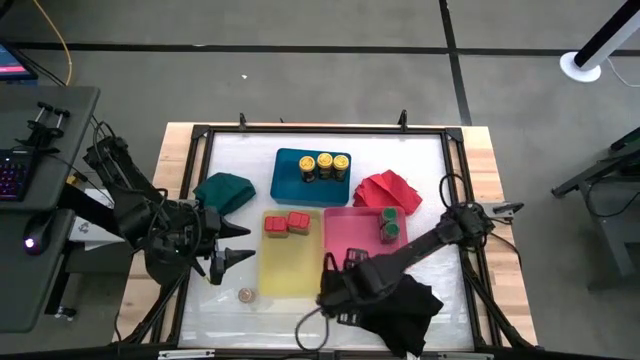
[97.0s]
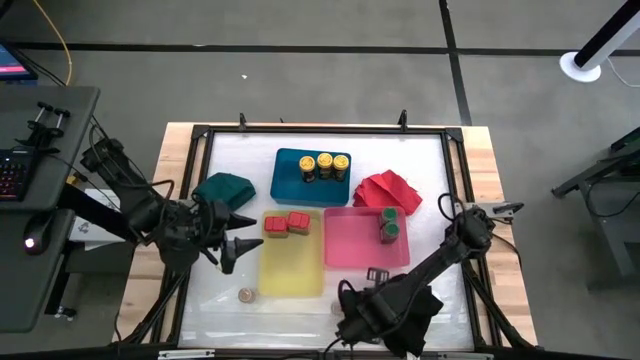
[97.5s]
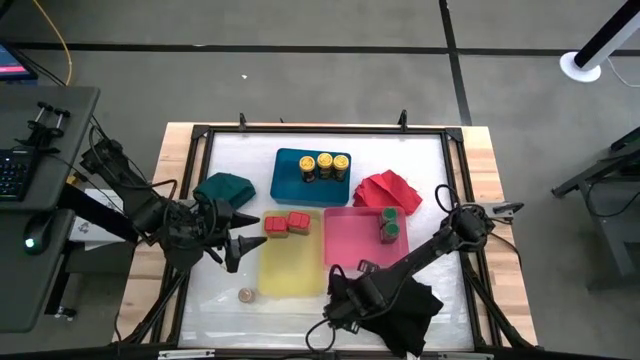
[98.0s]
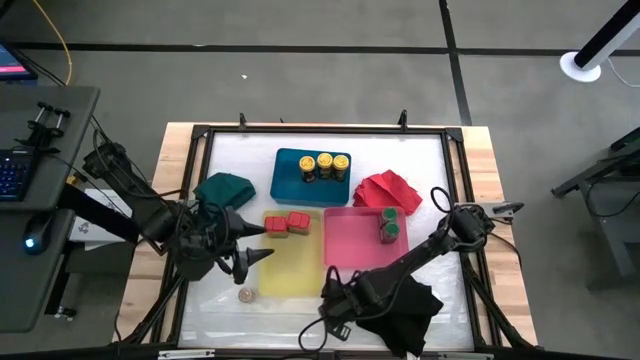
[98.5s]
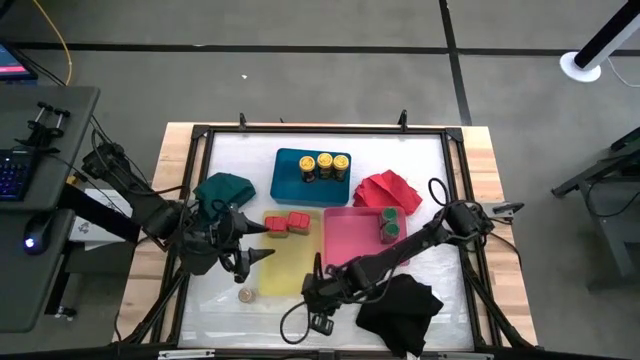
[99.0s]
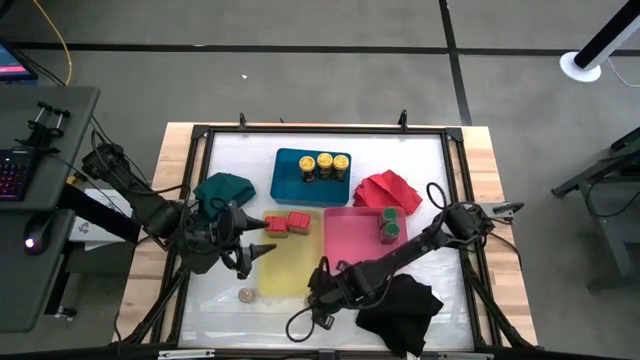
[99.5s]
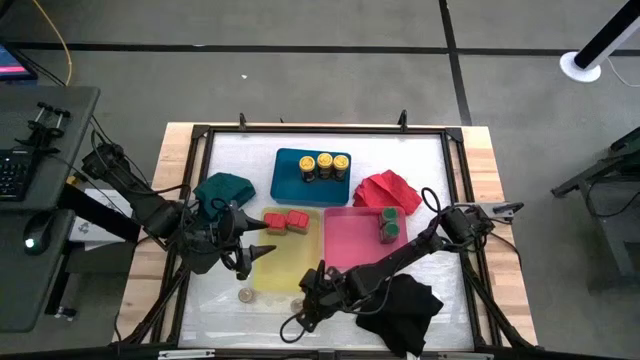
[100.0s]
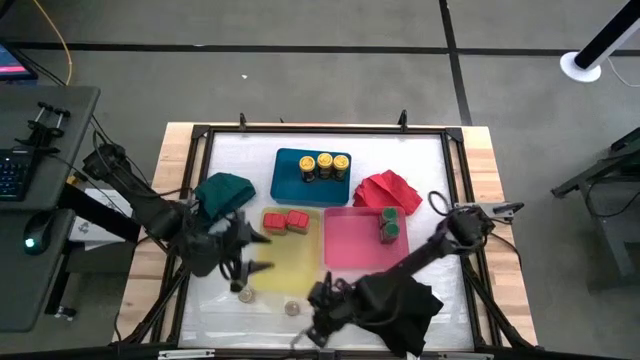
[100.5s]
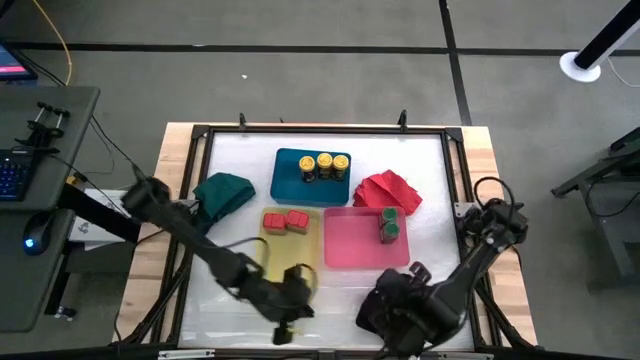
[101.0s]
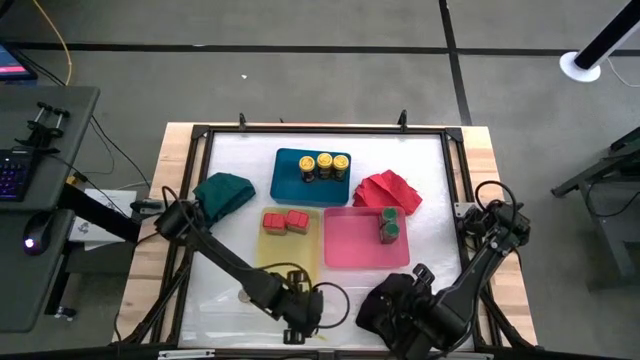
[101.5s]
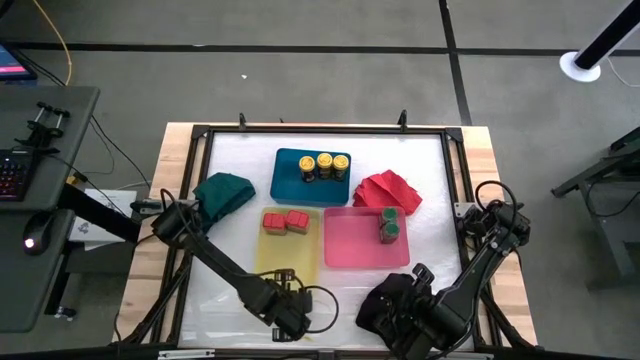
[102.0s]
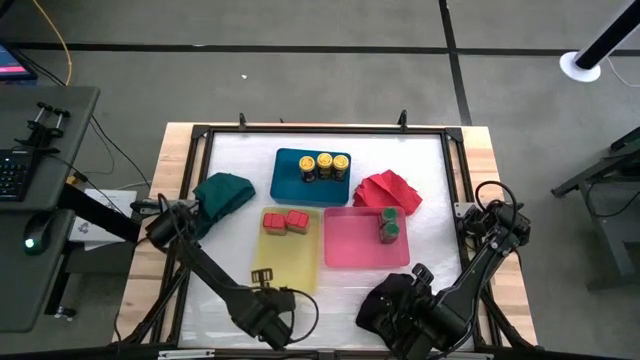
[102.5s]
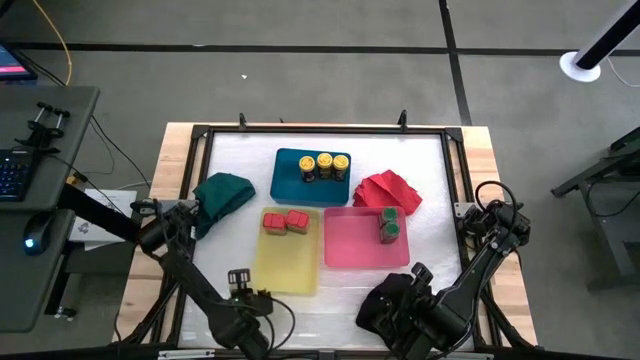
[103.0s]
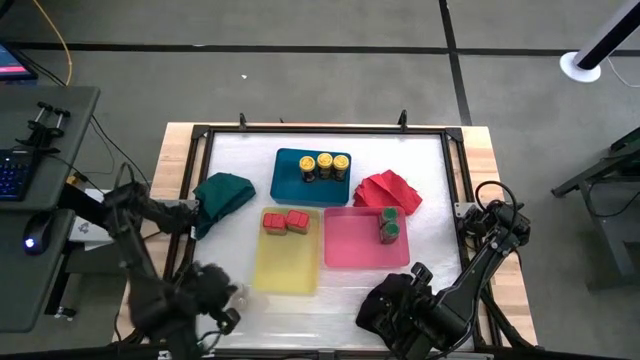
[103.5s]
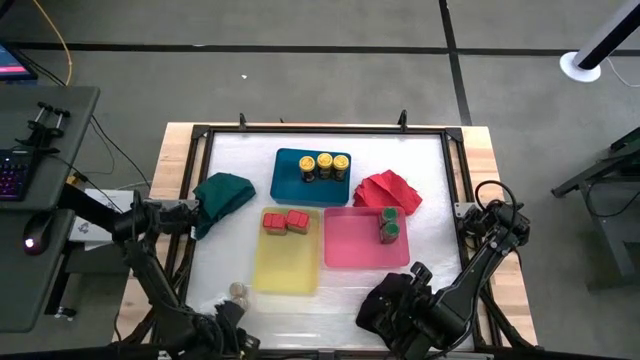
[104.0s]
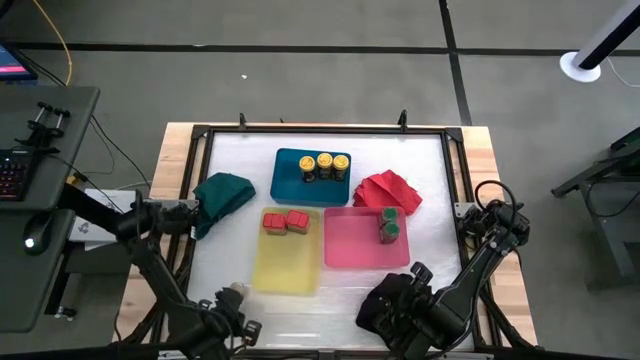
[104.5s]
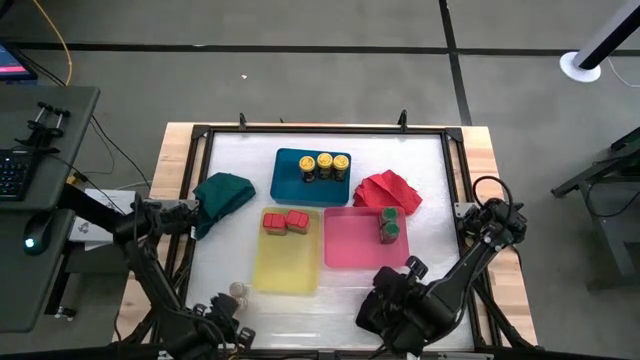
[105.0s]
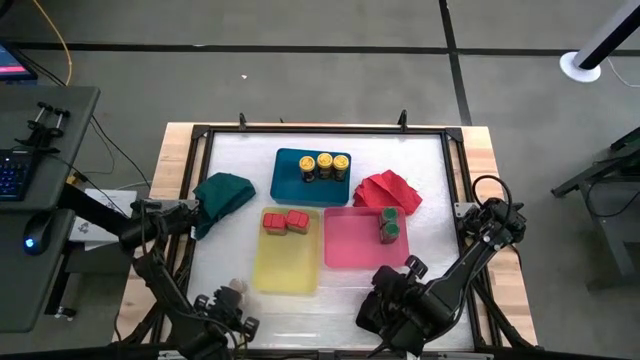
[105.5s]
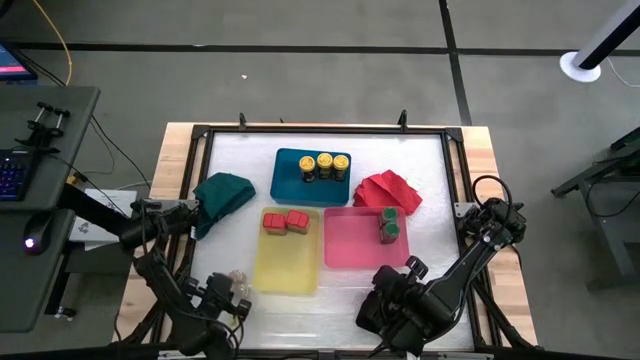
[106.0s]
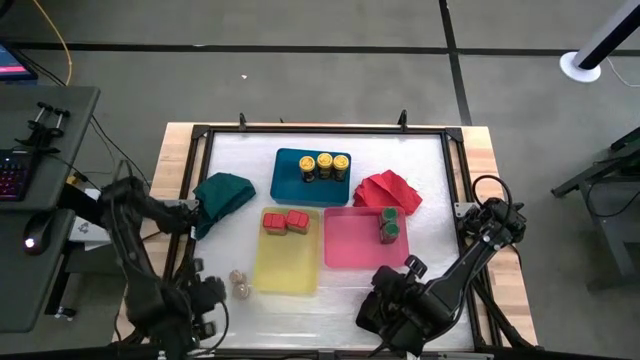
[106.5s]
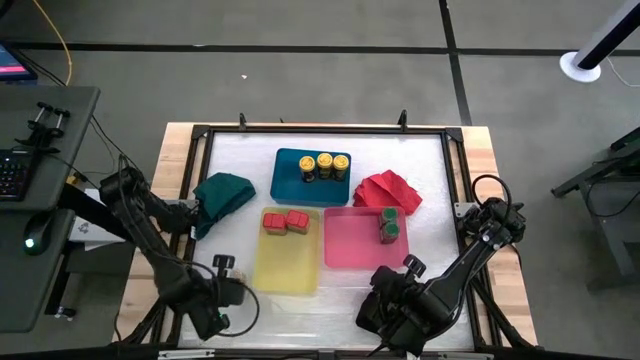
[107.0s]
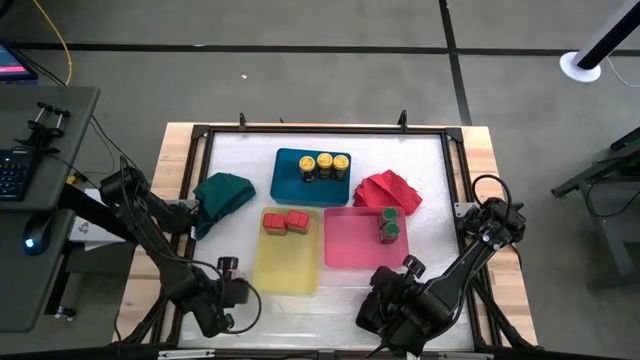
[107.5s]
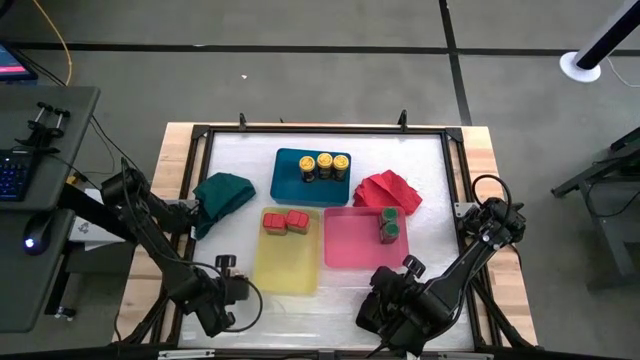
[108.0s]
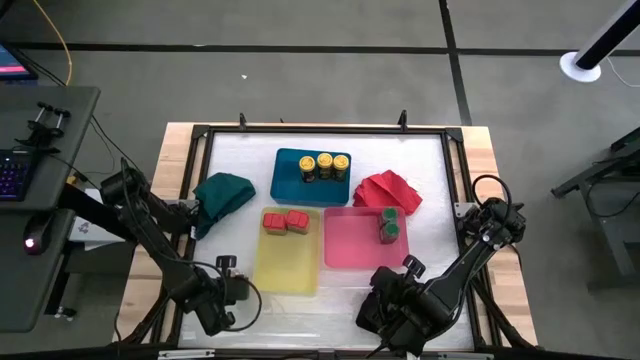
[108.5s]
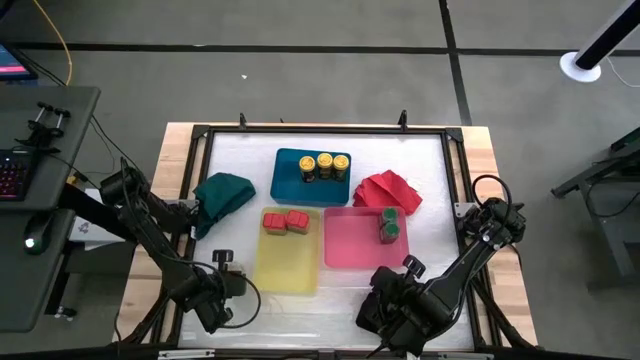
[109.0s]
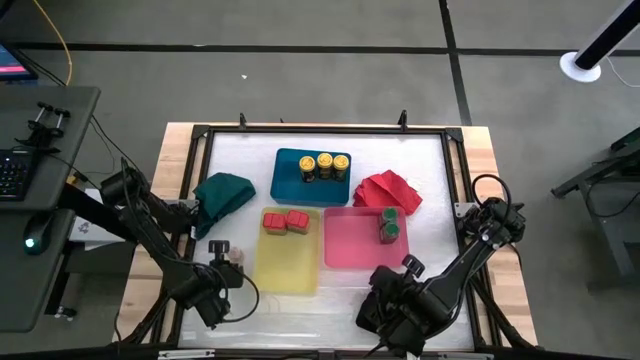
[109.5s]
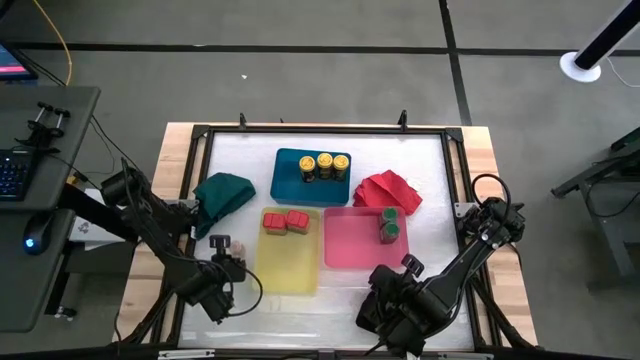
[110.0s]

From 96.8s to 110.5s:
Task: Sort spices by type
Adjust the brown spice bottles on the table

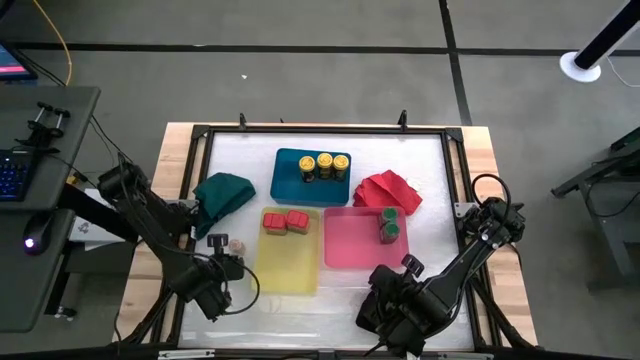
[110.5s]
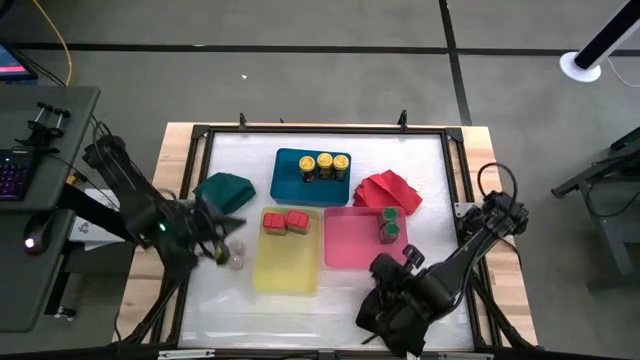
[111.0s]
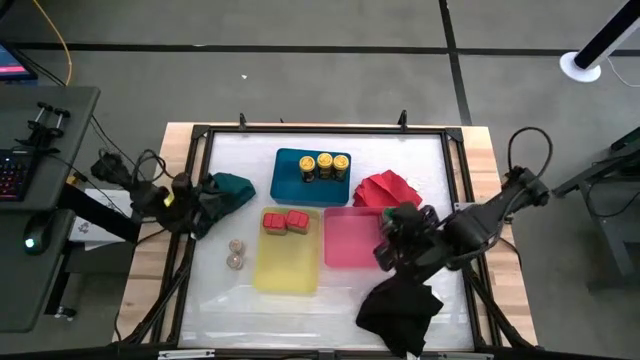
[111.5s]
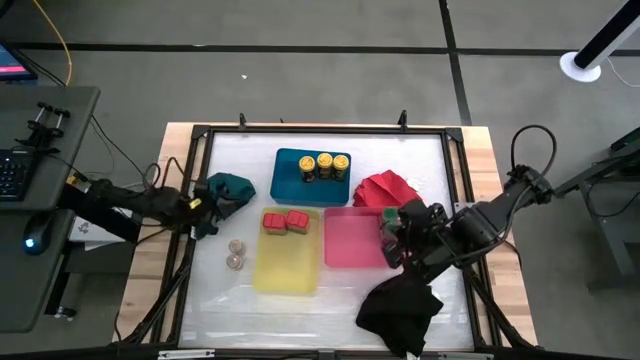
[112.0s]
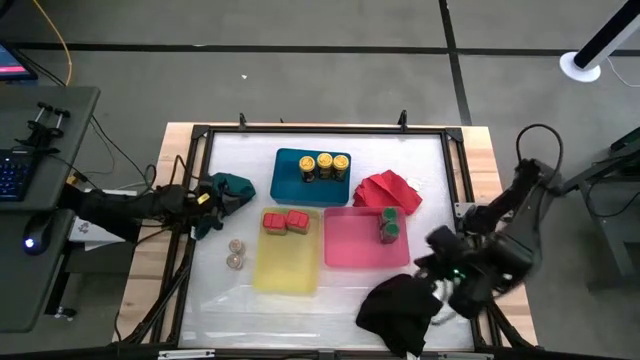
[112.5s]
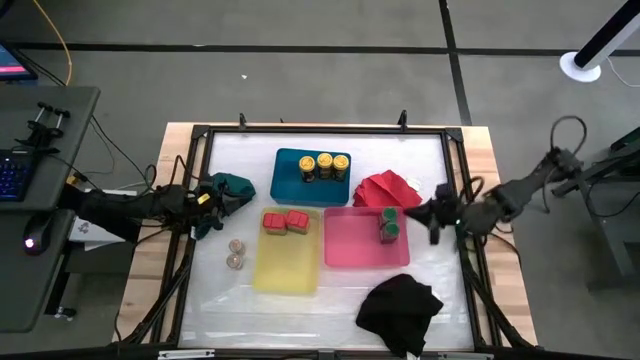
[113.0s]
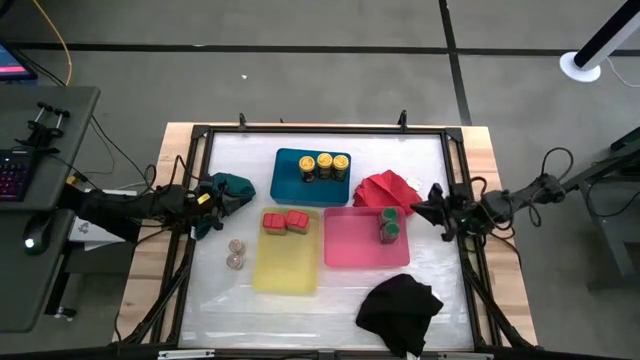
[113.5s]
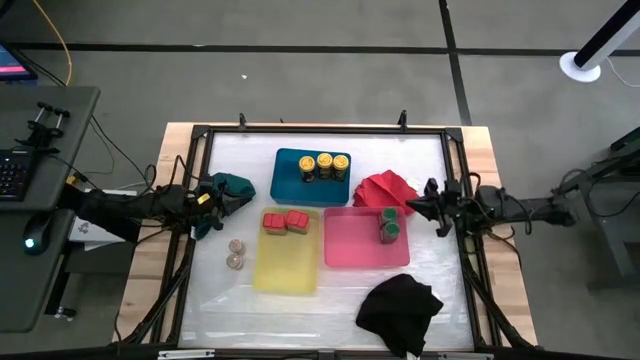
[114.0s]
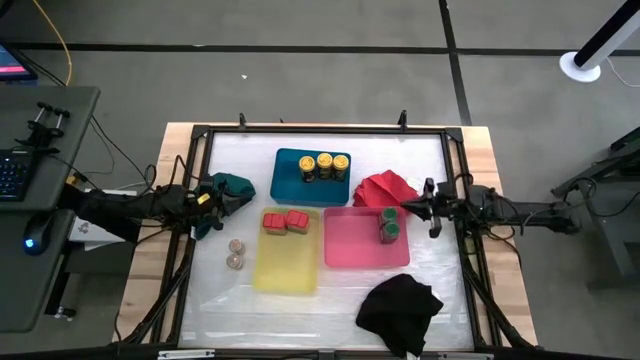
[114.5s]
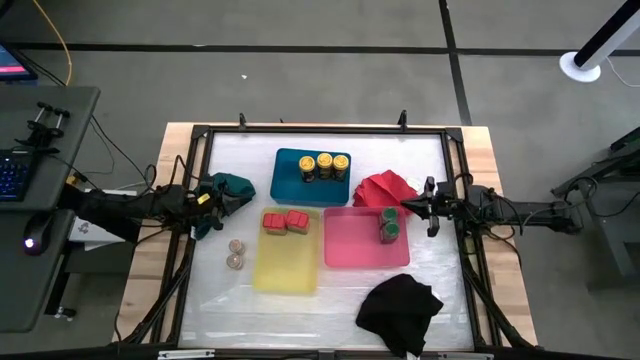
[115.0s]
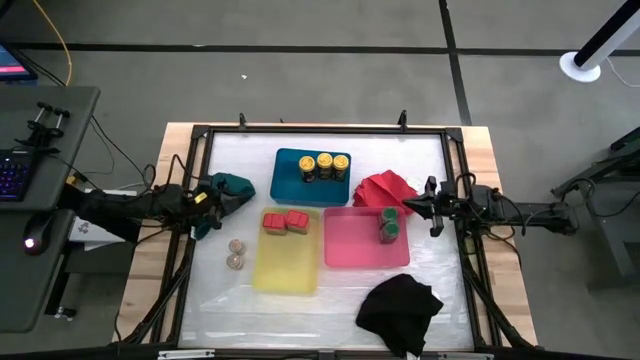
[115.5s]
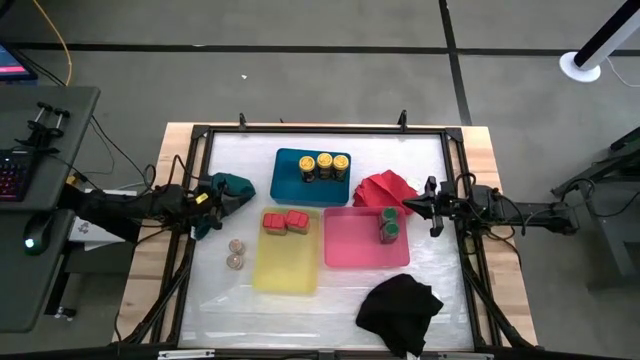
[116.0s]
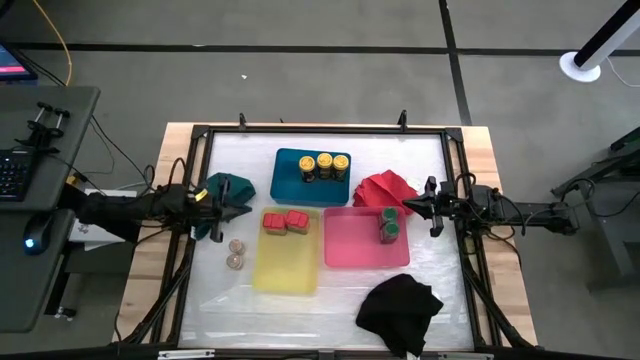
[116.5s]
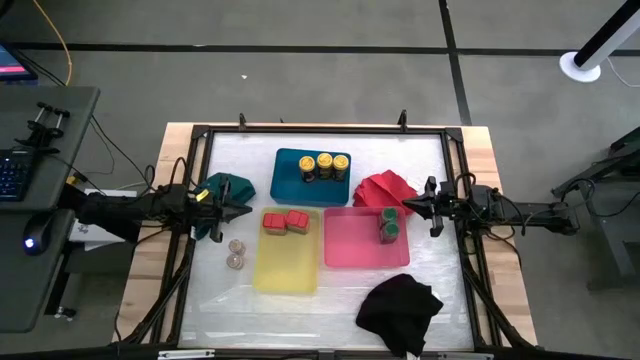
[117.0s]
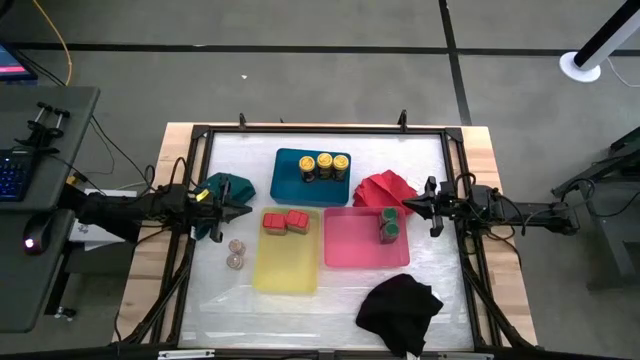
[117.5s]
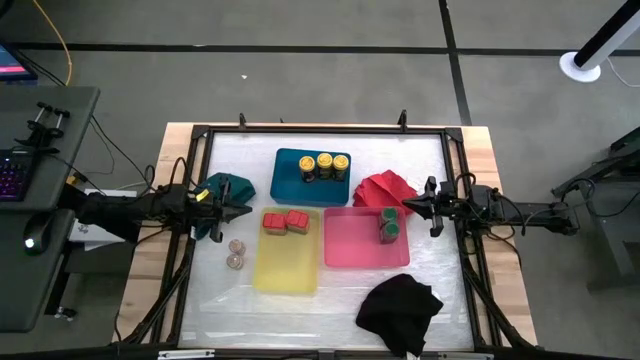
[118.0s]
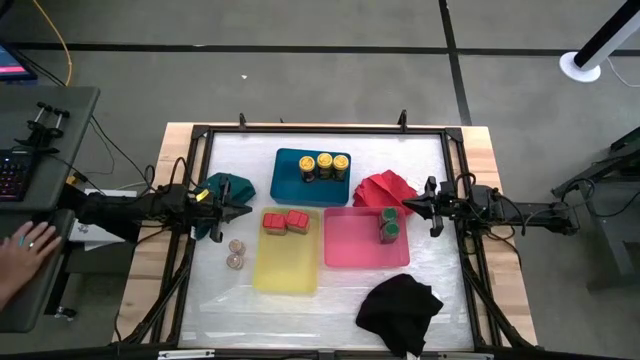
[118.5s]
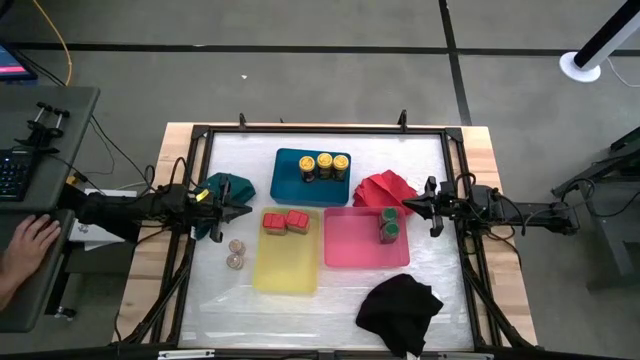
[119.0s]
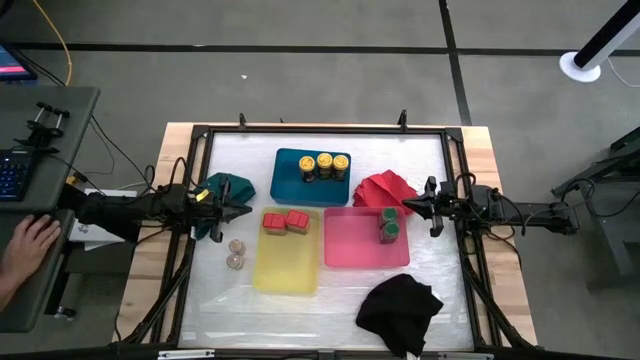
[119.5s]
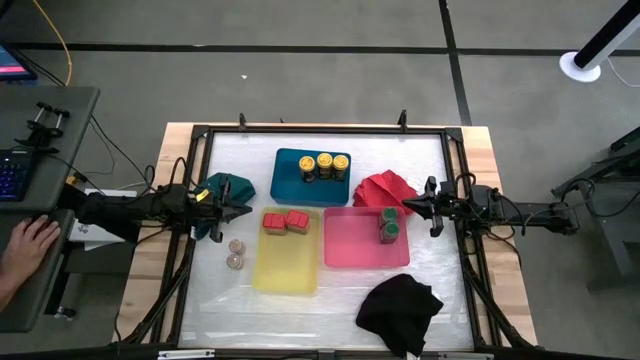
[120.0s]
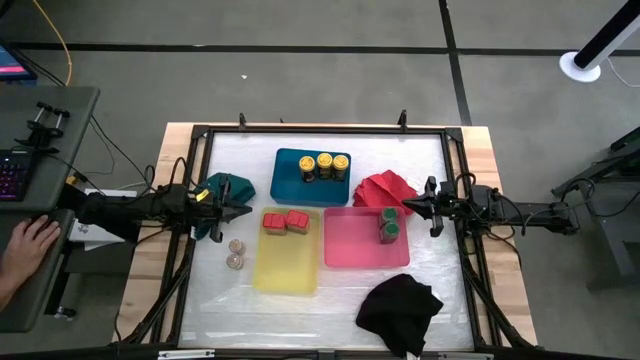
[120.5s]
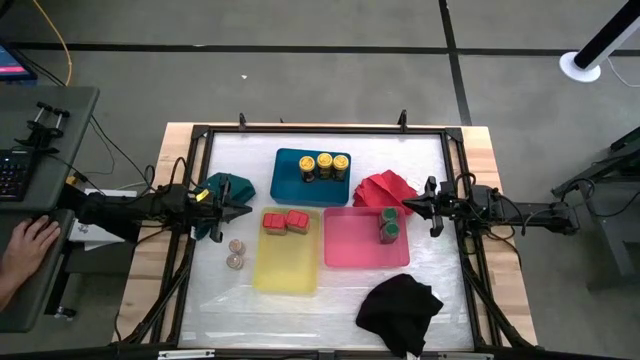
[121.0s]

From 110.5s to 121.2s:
Return to Home Position
